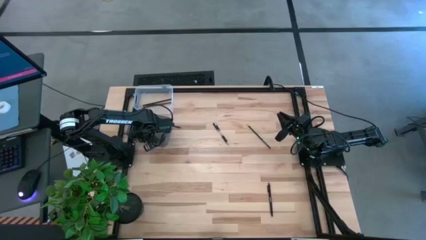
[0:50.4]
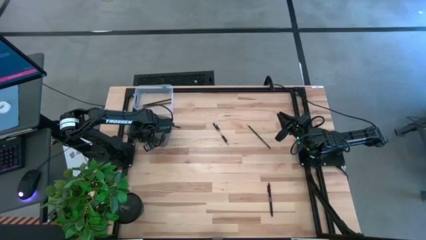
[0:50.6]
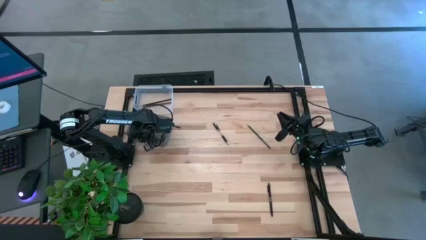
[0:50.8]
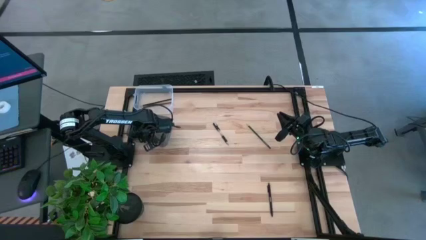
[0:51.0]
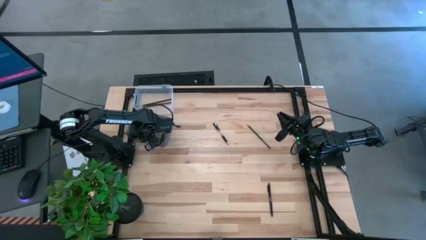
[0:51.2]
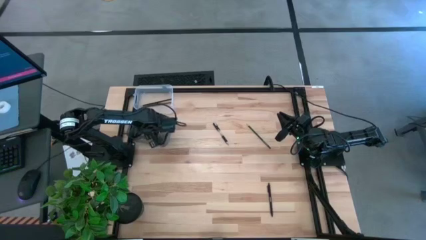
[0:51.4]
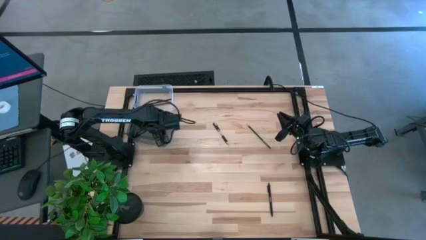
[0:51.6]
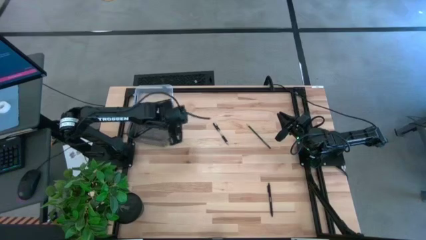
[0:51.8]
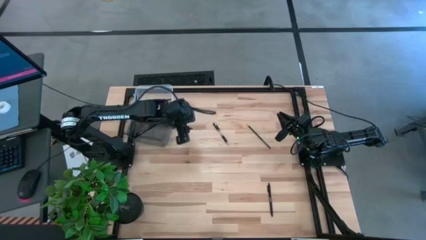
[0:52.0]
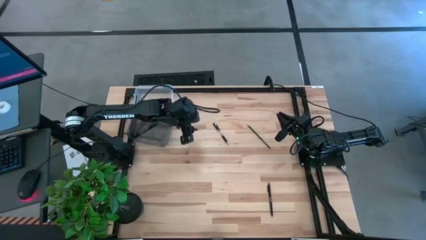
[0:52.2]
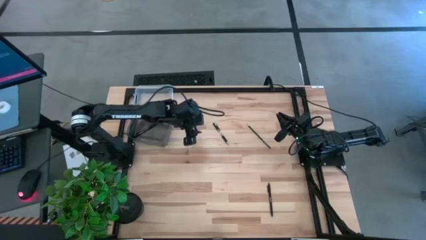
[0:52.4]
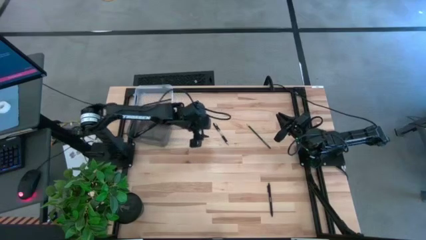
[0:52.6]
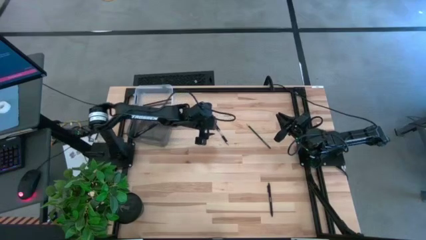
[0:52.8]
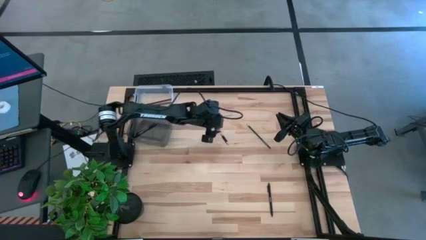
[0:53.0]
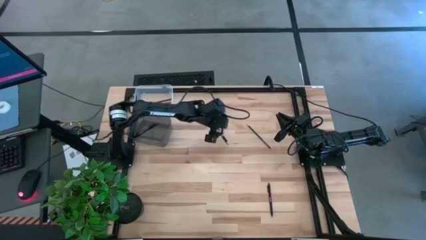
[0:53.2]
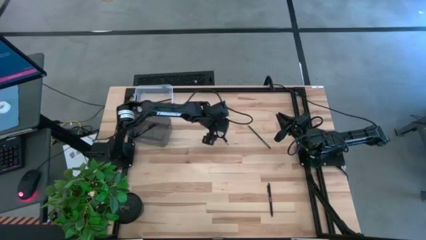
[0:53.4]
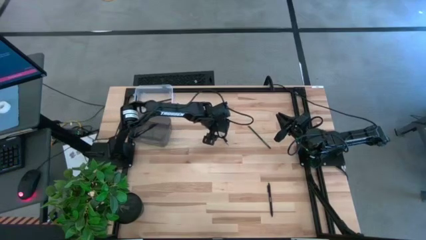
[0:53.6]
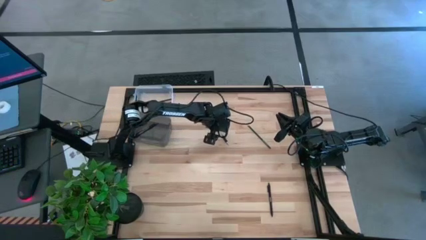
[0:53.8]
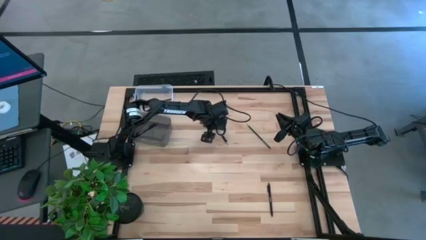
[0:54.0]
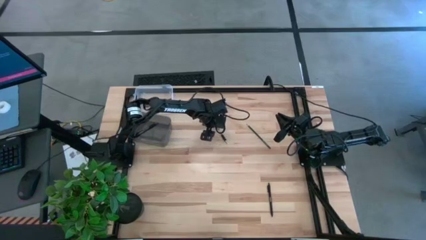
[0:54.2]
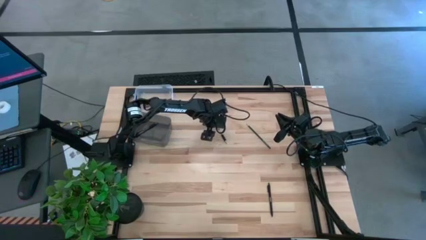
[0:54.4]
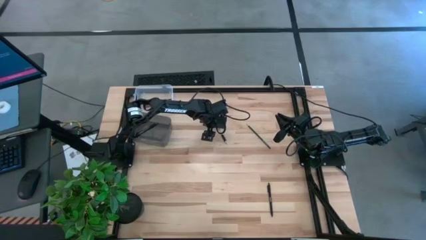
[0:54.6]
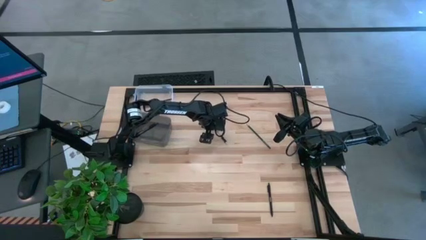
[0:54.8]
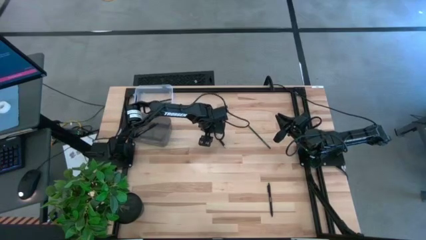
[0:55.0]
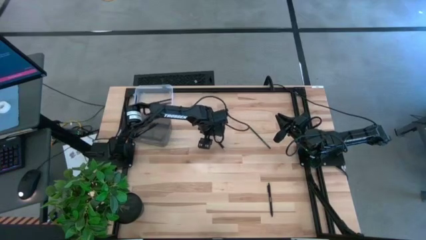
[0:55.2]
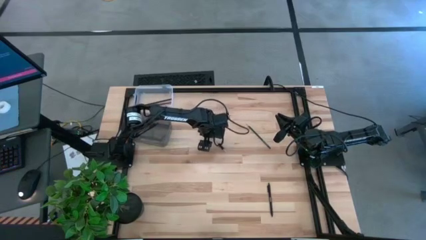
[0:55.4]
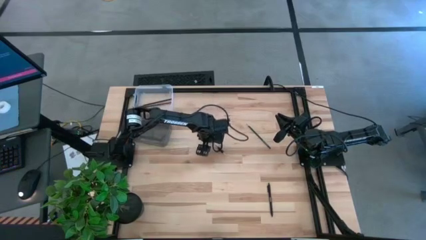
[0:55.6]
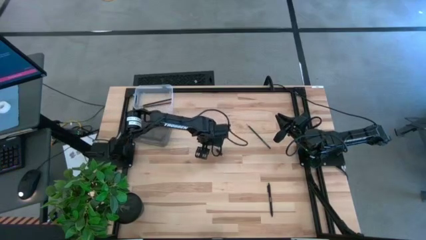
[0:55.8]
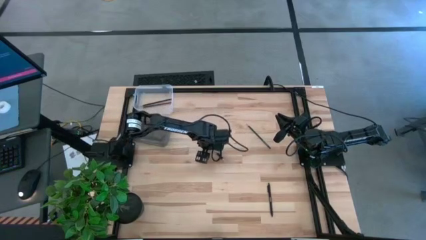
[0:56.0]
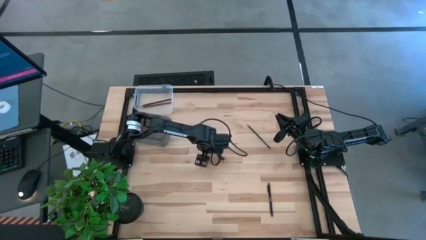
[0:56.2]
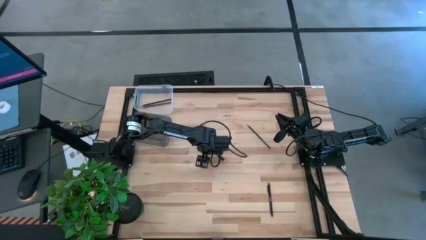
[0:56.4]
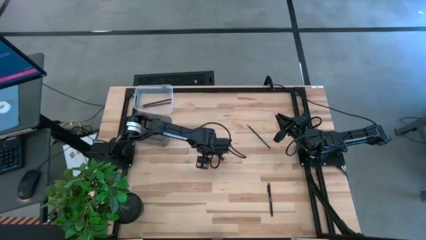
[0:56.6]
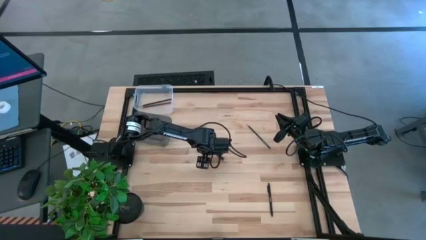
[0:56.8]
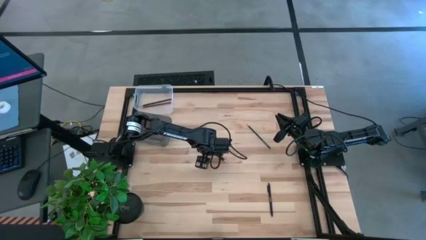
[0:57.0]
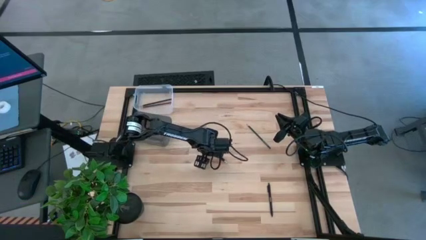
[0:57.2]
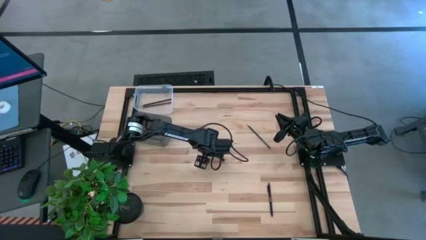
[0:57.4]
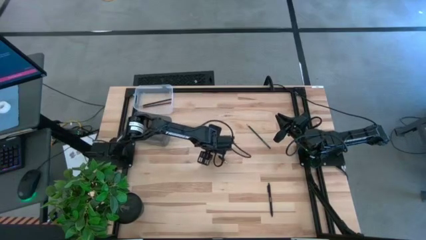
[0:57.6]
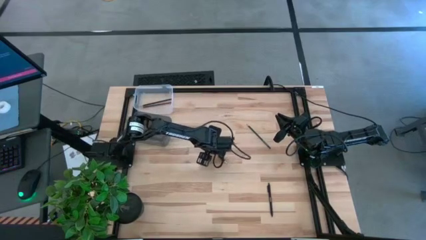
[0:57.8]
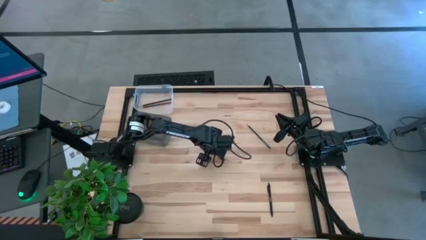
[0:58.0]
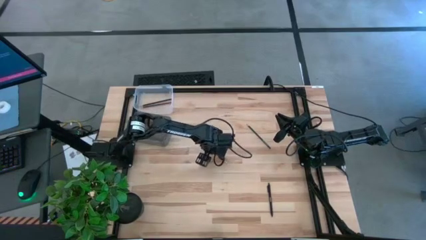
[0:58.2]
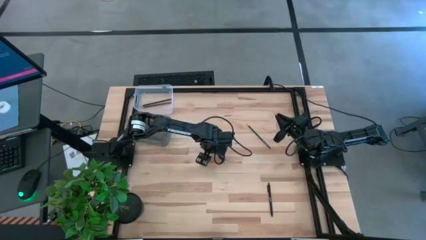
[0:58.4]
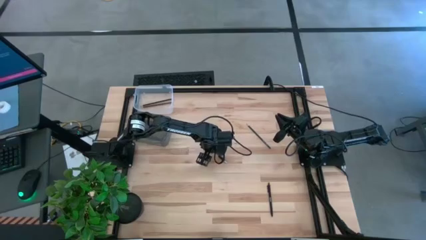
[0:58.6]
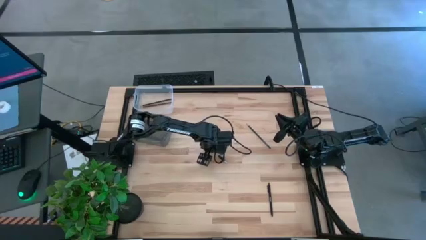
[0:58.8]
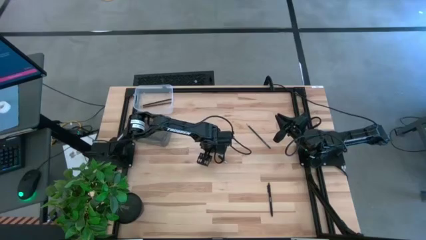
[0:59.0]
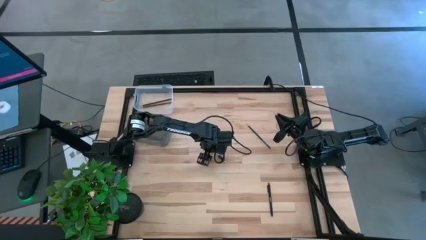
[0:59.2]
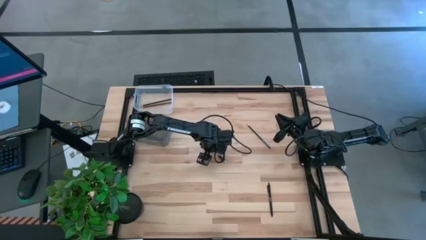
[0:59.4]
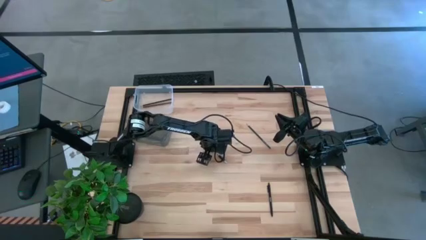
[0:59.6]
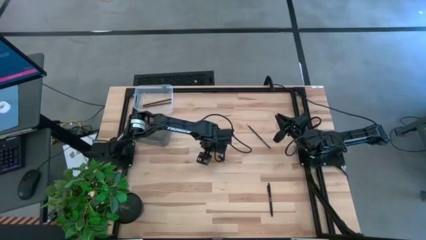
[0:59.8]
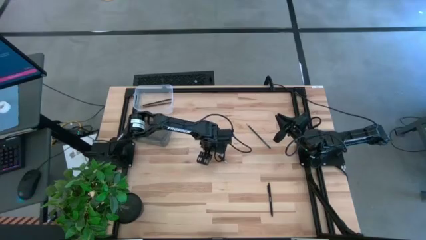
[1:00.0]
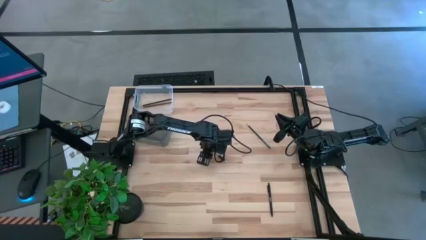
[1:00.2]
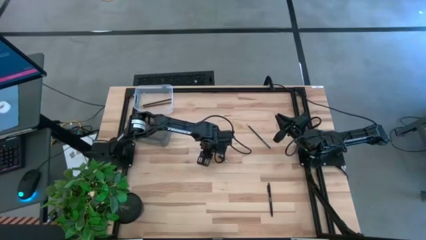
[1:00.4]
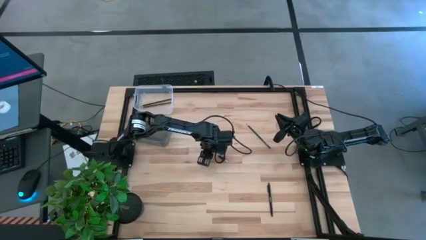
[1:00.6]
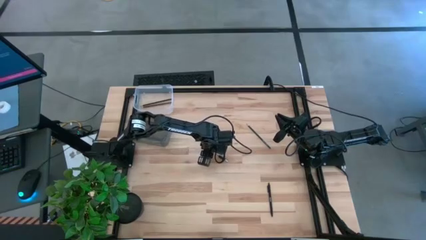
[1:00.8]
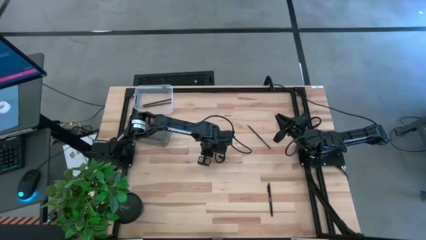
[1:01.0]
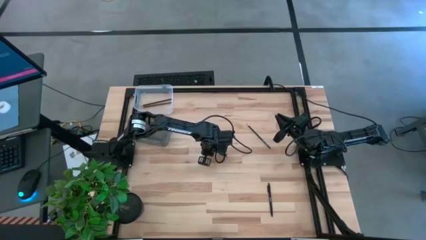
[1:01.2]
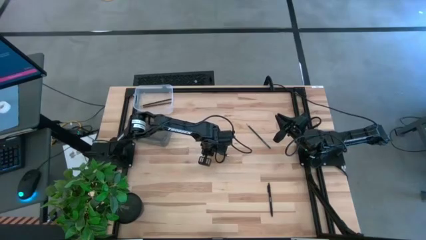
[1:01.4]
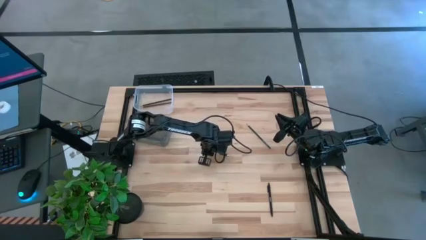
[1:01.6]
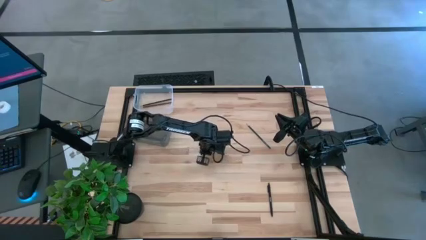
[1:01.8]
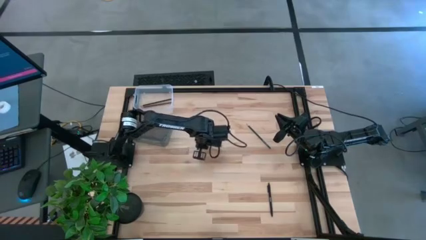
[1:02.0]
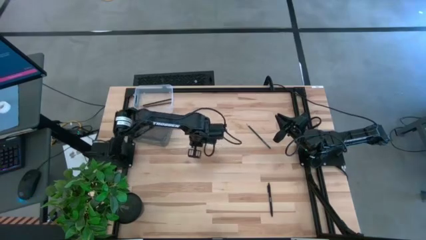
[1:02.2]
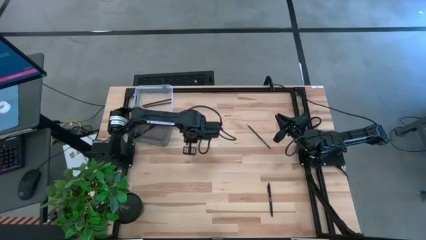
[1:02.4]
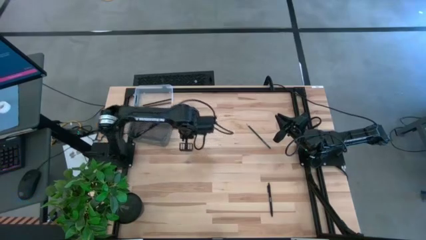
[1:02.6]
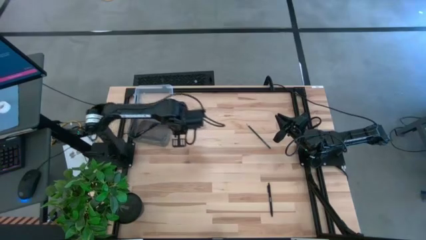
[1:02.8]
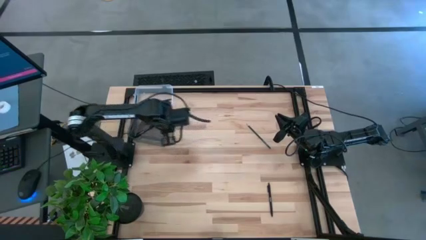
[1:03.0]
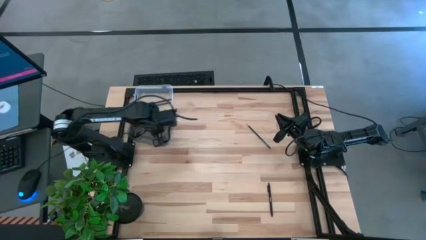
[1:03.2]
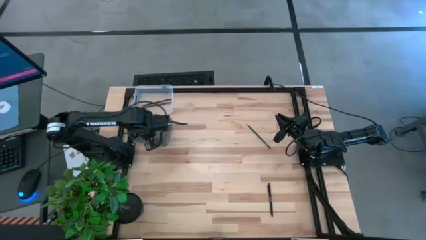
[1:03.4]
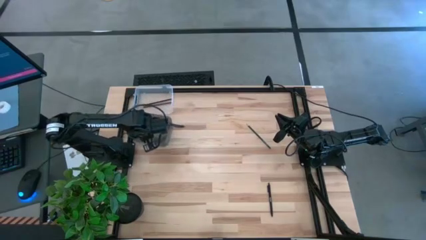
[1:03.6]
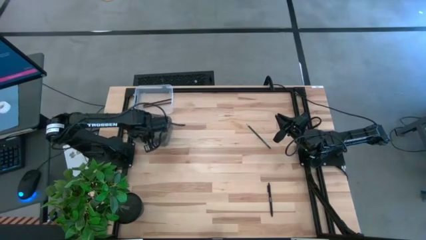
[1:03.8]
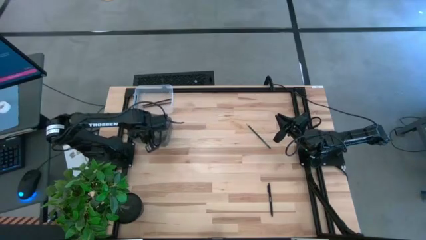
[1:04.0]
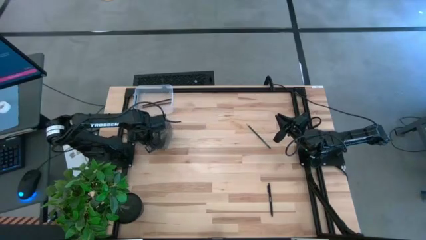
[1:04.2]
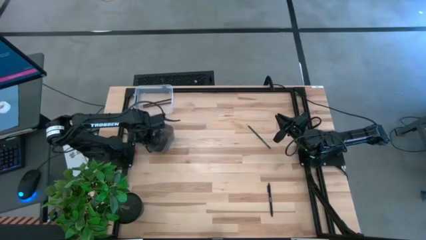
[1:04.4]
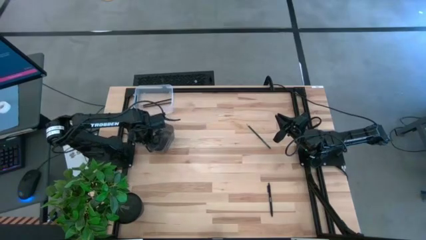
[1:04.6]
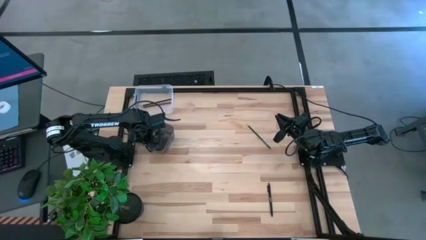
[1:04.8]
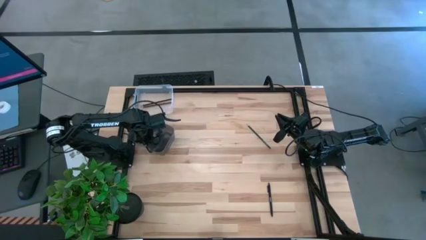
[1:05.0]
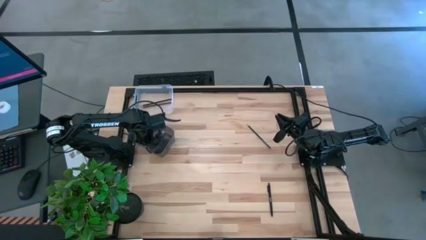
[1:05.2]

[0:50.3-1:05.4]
Task: Sort pens & pencils
Put the silver pen into the black bin

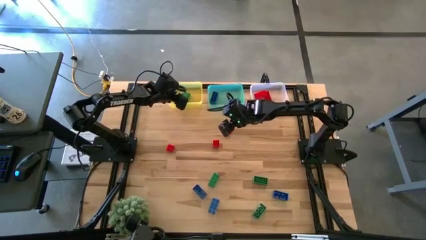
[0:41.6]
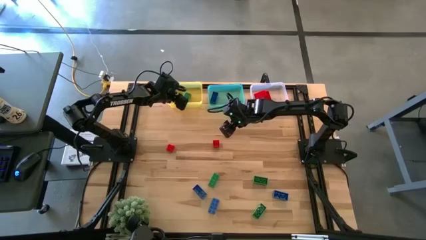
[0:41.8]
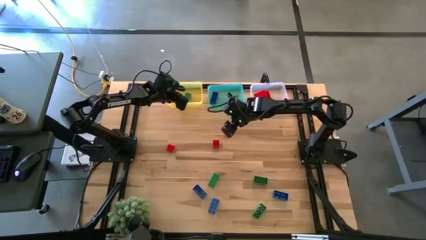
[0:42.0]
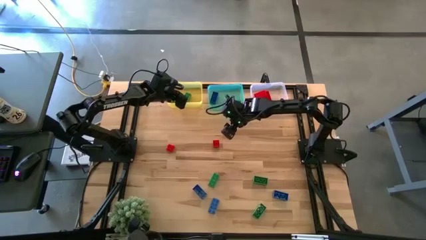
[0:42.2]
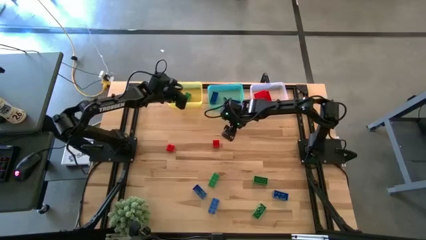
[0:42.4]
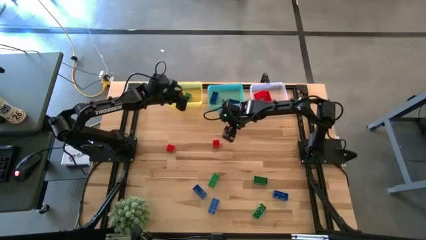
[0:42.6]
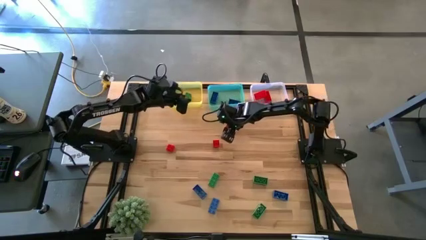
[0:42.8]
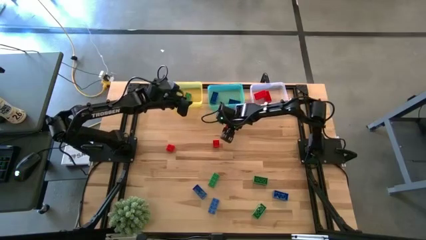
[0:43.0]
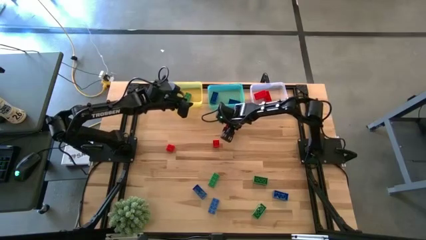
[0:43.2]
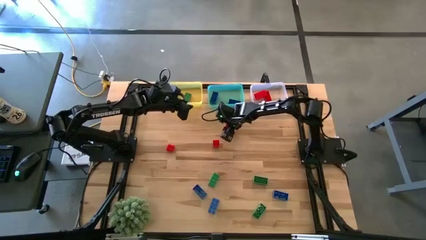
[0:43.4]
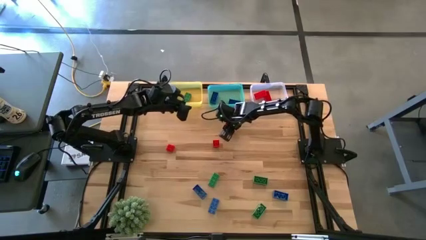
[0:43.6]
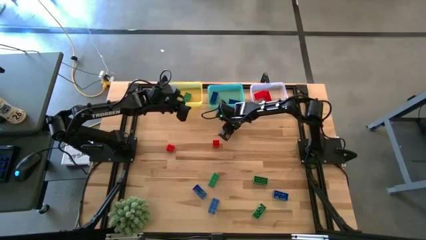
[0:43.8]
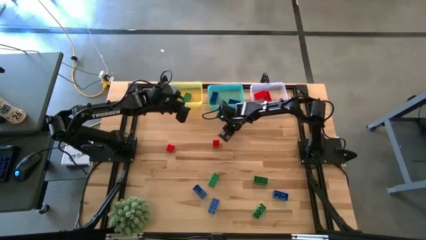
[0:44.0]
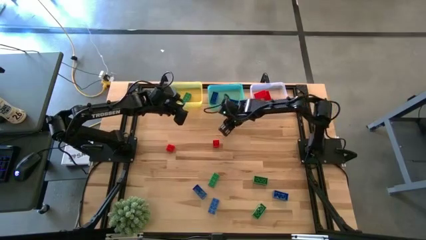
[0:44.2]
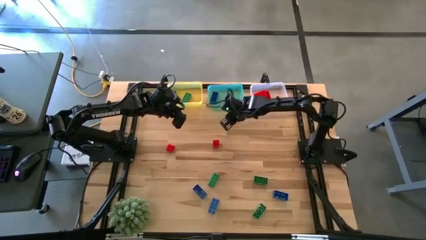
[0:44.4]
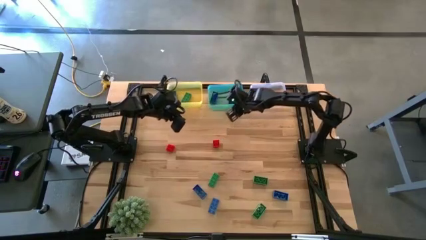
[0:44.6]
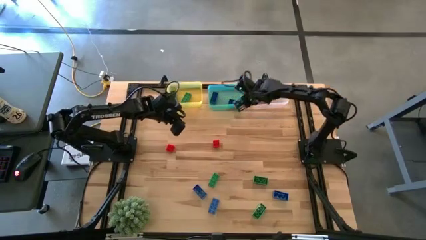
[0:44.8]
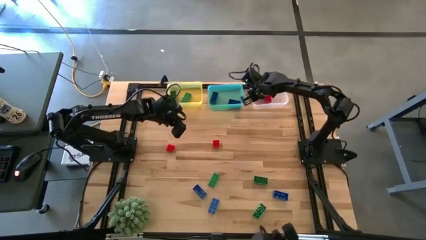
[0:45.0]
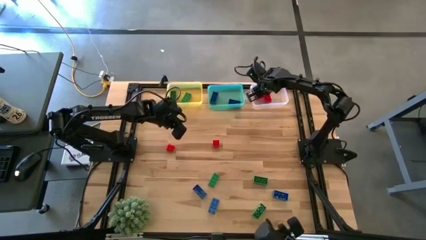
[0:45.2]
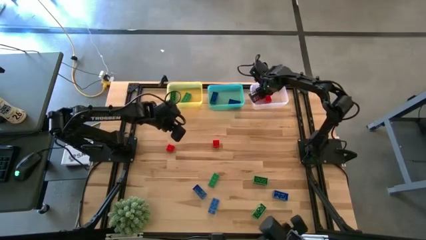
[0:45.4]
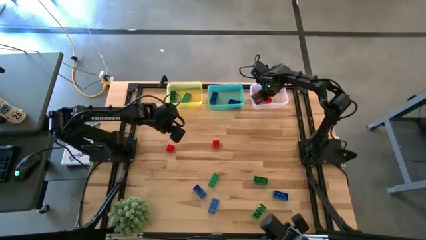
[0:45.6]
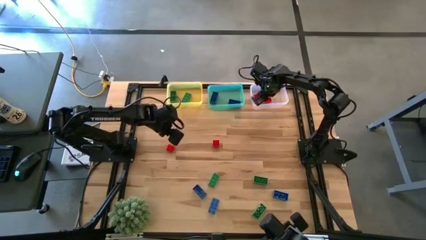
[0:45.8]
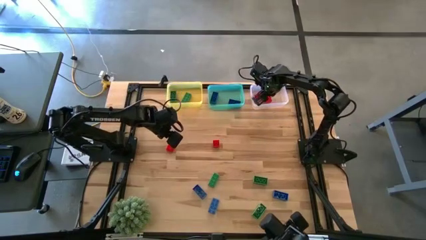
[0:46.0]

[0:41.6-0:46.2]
Task: Sort & place blocks by color
Put the red game piece into the white bin
